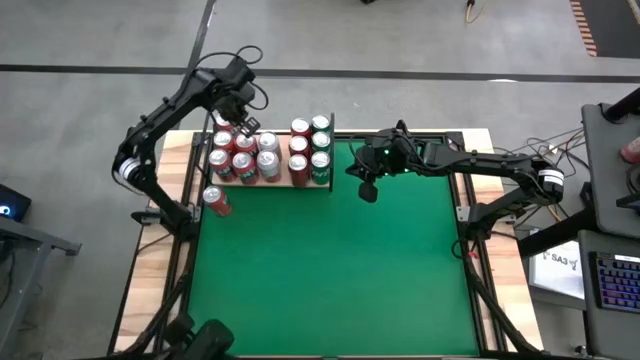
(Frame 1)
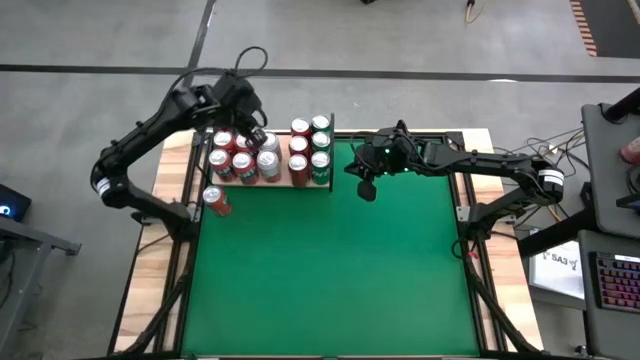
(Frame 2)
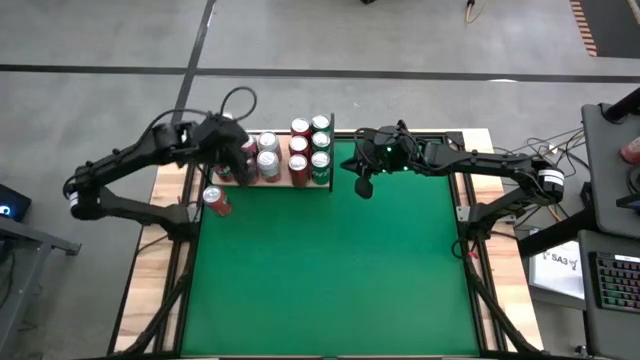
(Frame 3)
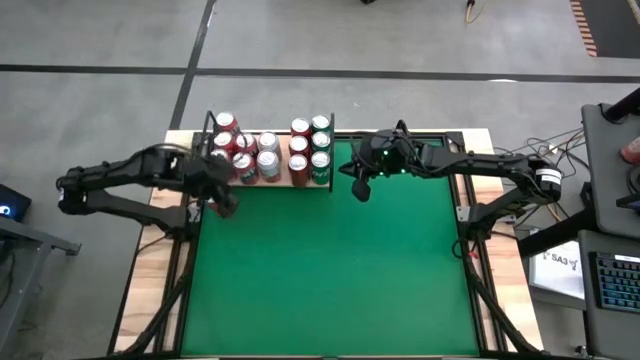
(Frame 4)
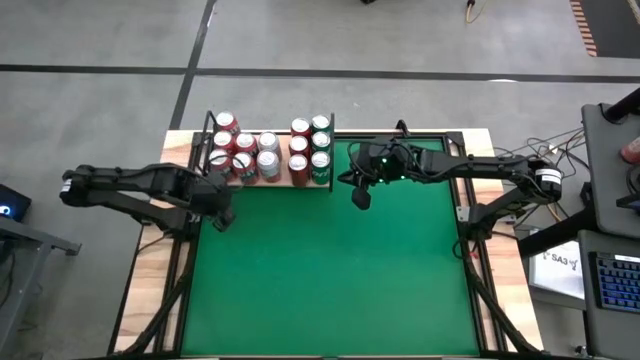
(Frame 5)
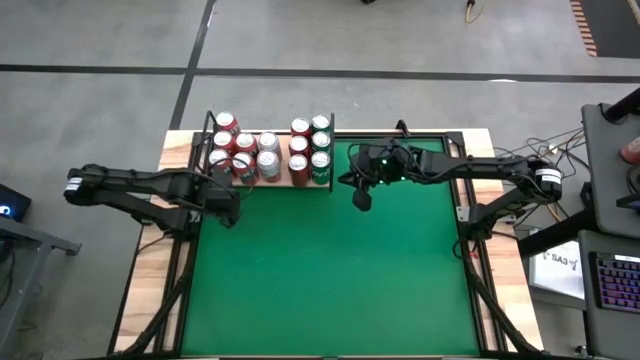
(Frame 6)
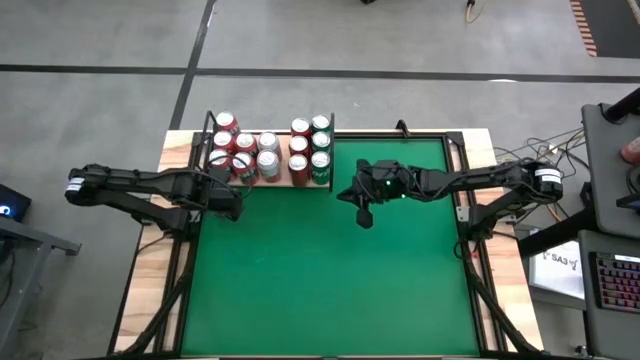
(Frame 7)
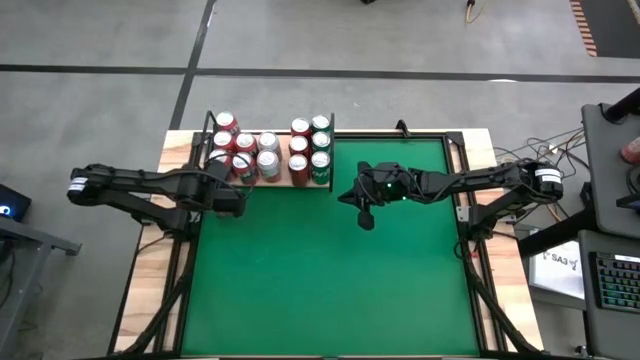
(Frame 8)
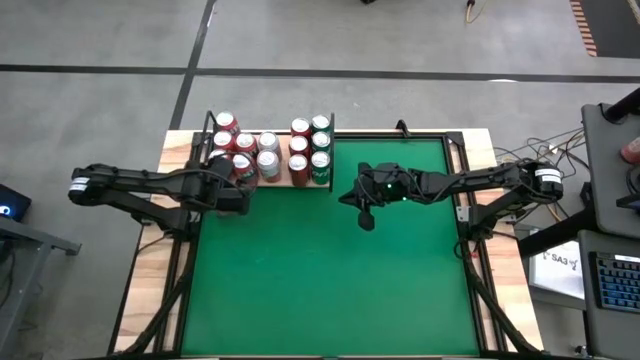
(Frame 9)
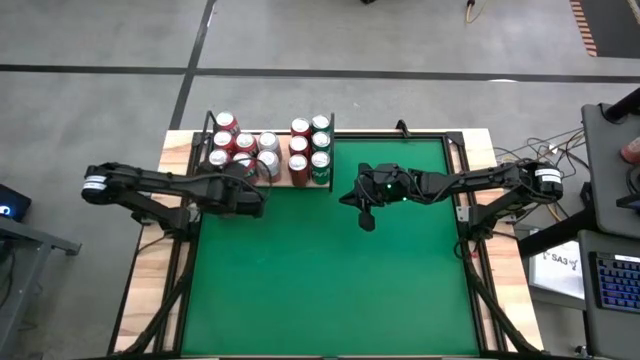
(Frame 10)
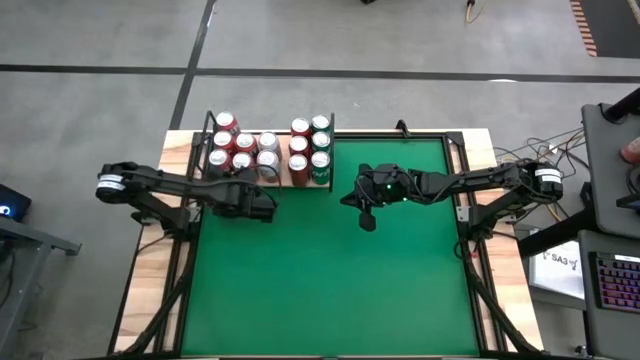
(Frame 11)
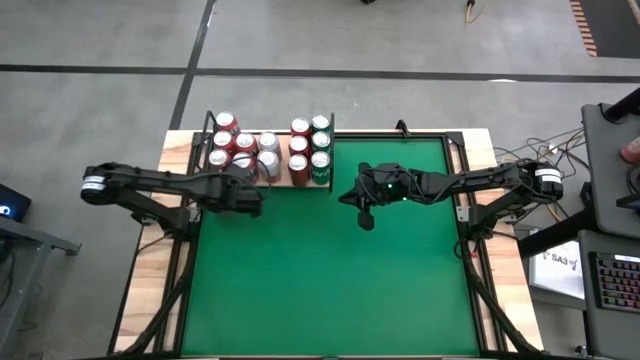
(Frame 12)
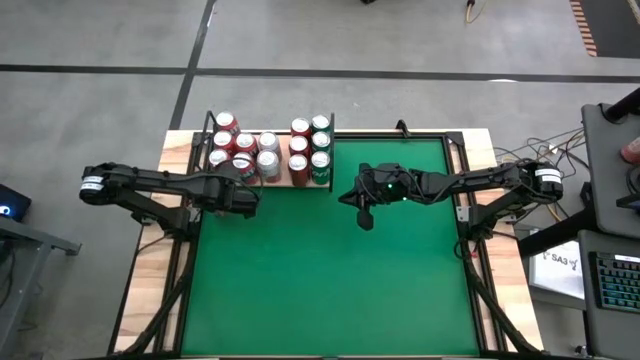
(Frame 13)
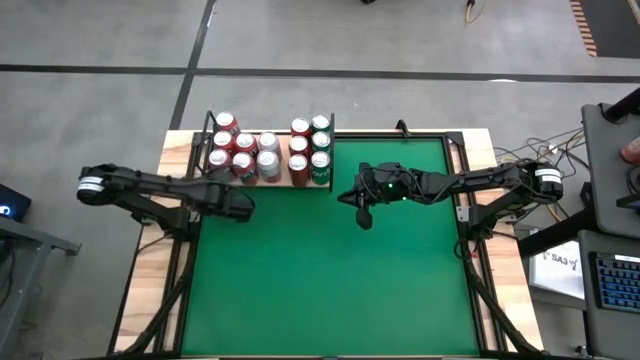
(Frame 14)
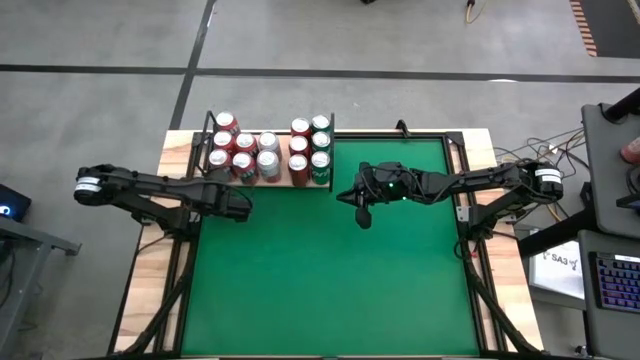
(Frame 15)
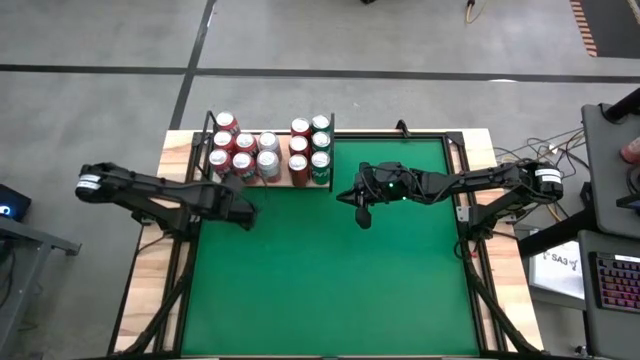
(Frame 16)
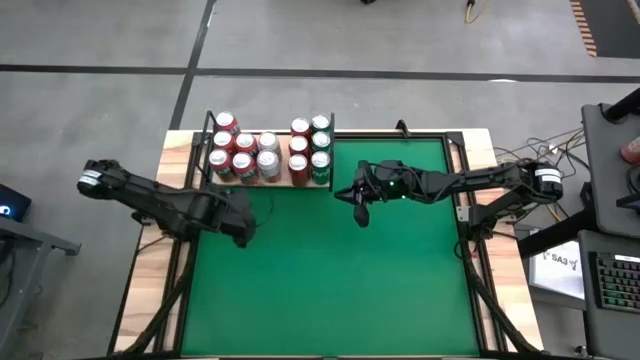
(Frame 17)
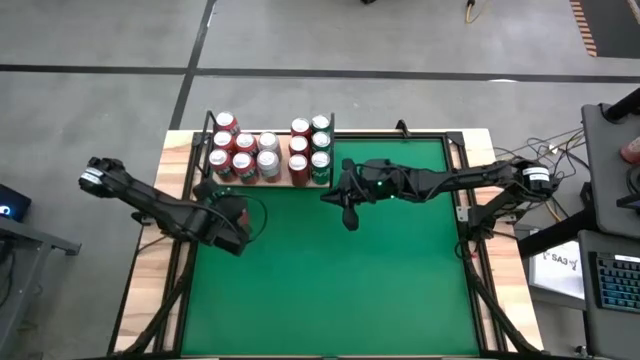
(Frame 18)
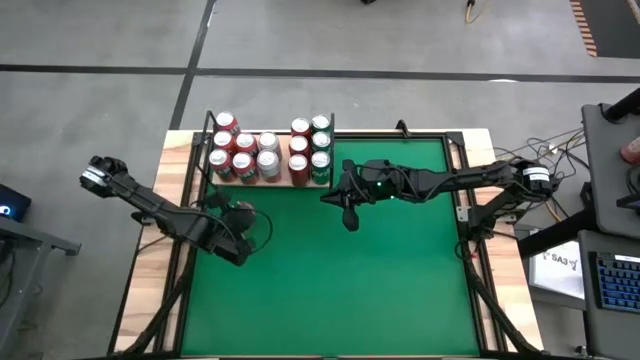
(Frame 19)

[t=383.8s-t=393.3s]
Task: Place canned beverage on shelf
Put the red soda can on the shelf aligned with the other red soda can

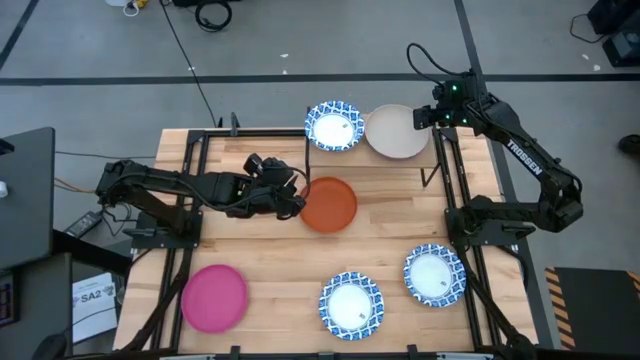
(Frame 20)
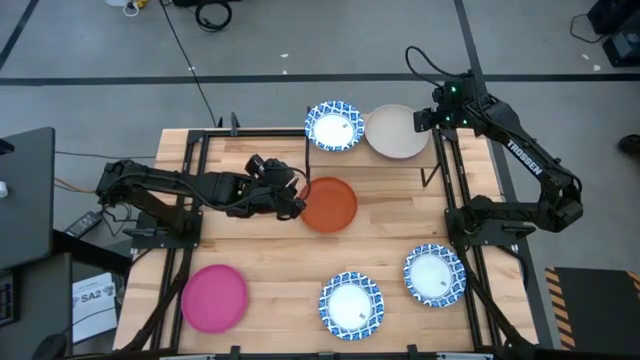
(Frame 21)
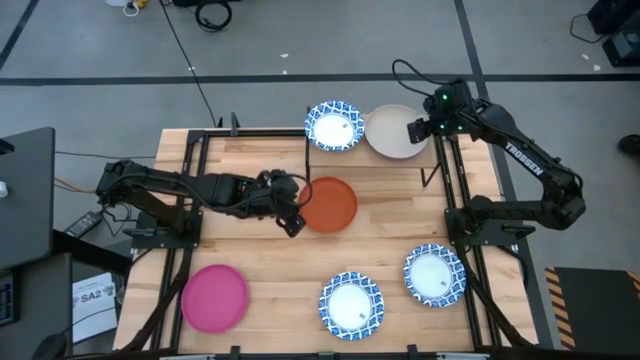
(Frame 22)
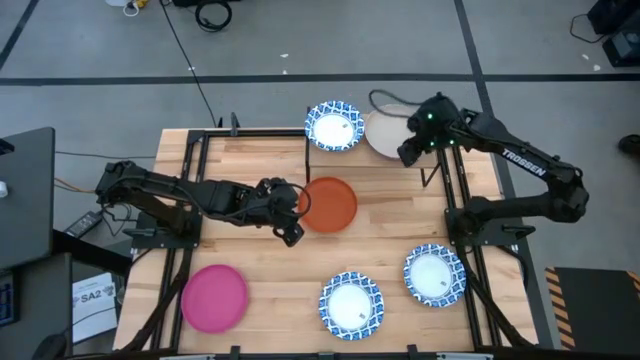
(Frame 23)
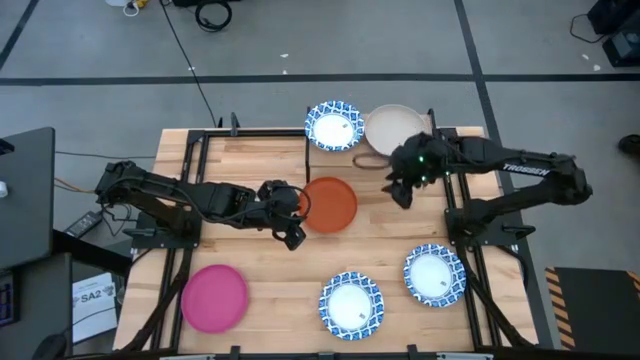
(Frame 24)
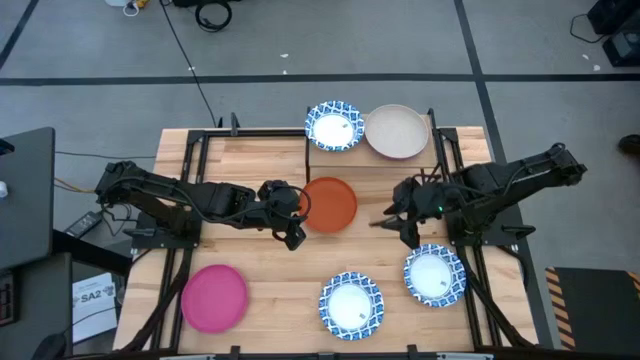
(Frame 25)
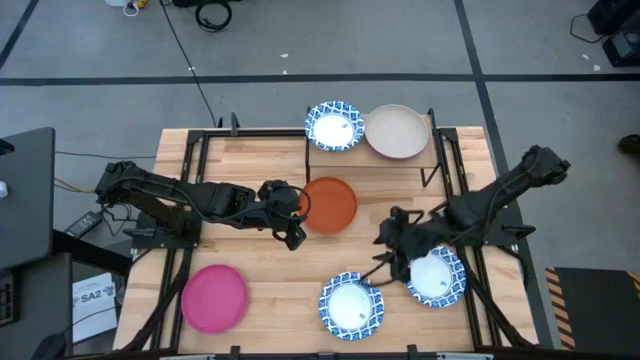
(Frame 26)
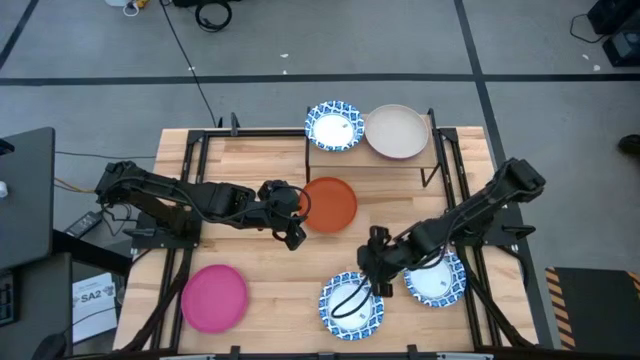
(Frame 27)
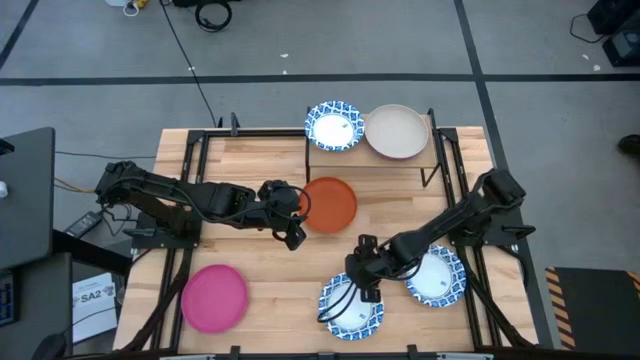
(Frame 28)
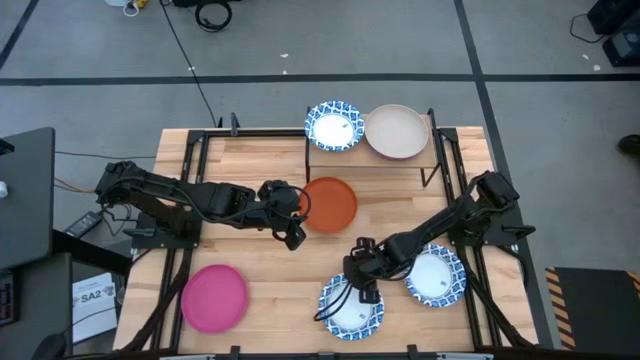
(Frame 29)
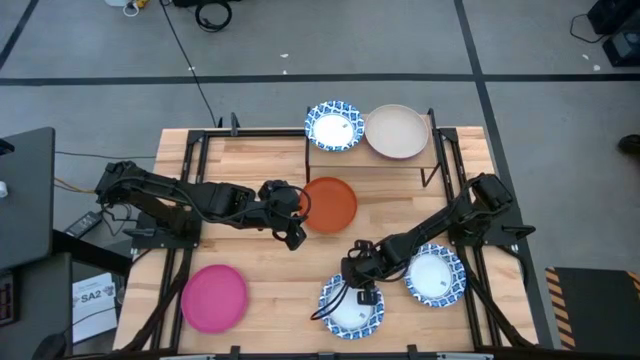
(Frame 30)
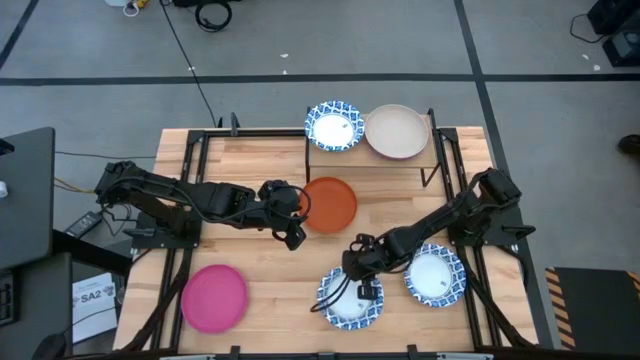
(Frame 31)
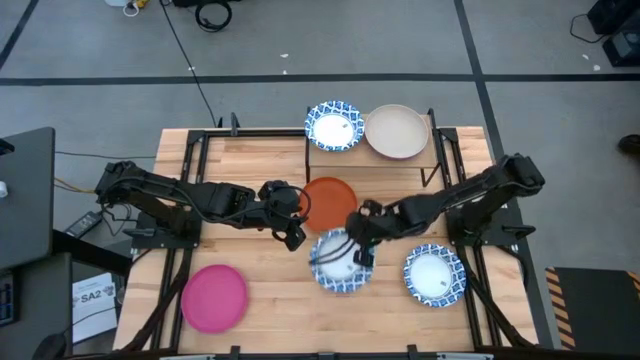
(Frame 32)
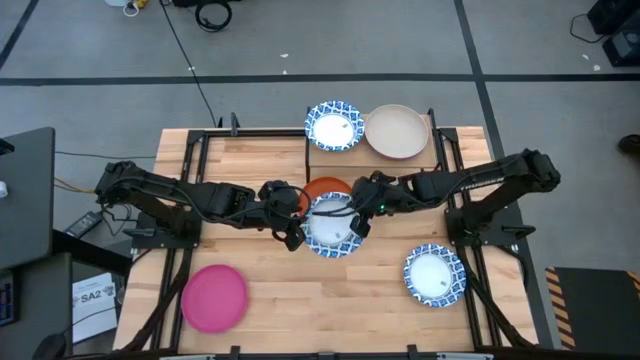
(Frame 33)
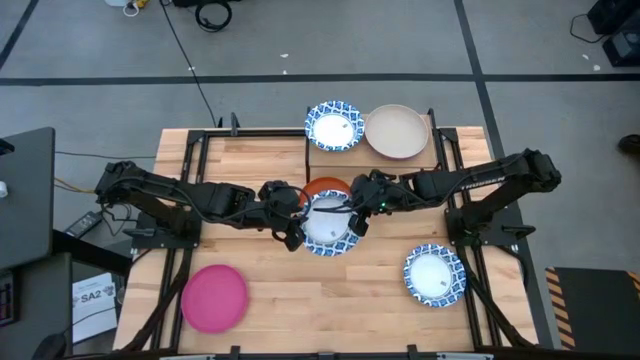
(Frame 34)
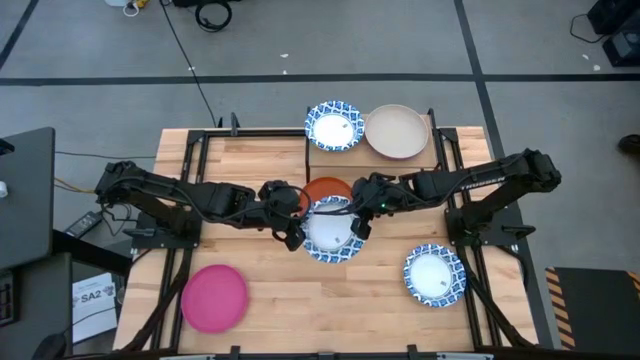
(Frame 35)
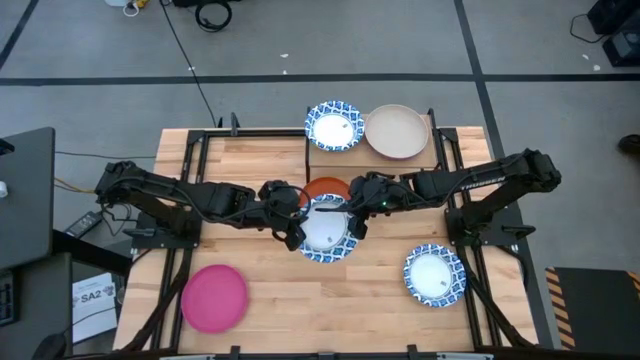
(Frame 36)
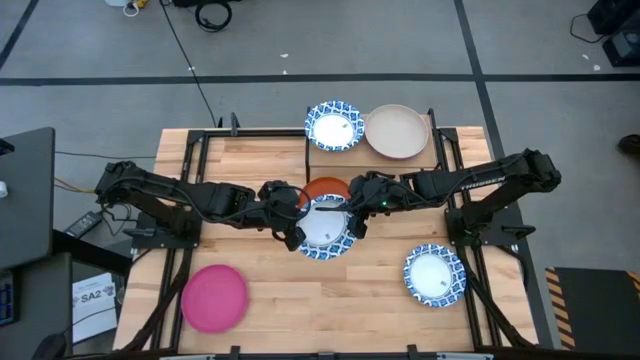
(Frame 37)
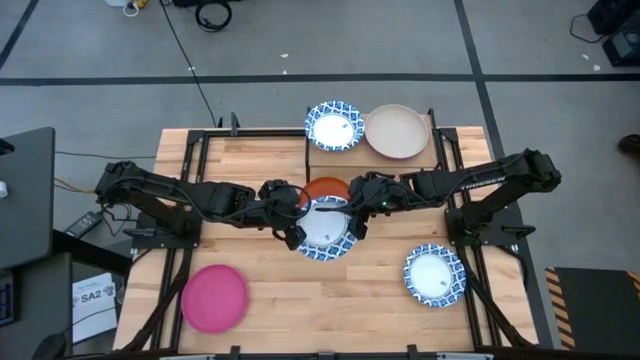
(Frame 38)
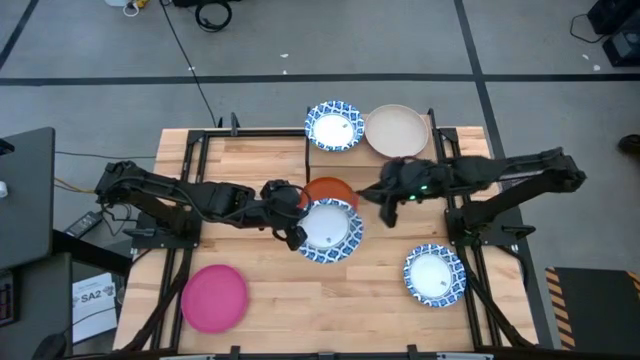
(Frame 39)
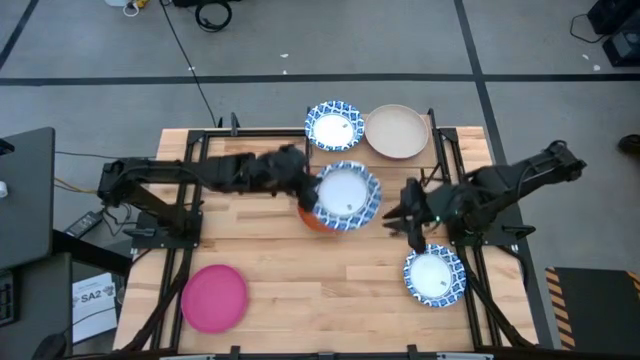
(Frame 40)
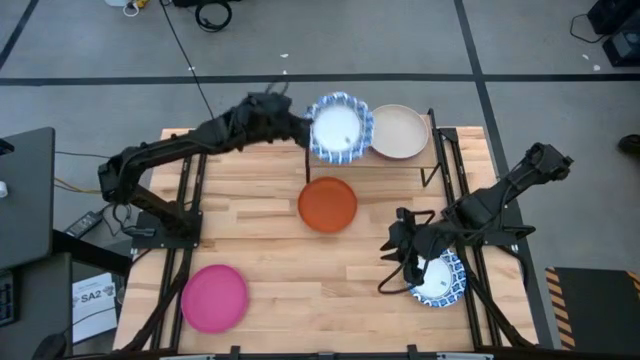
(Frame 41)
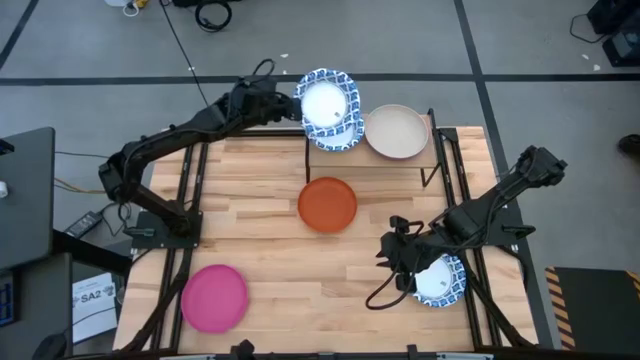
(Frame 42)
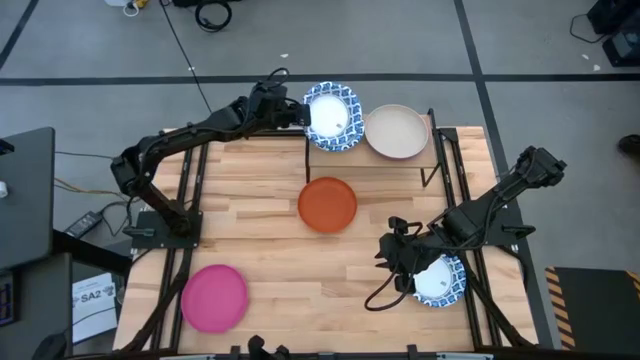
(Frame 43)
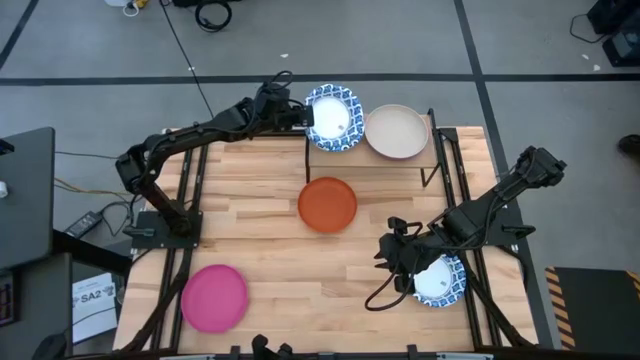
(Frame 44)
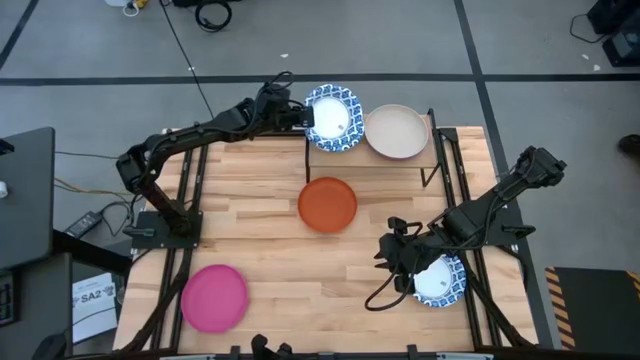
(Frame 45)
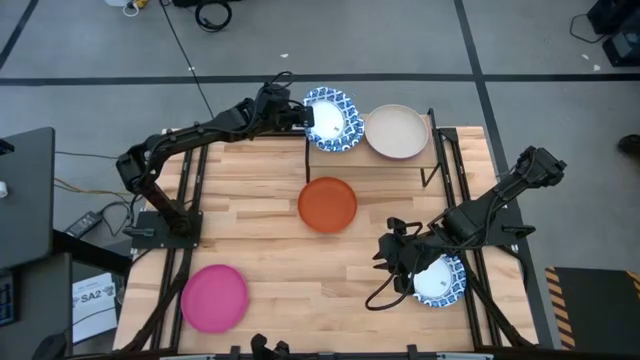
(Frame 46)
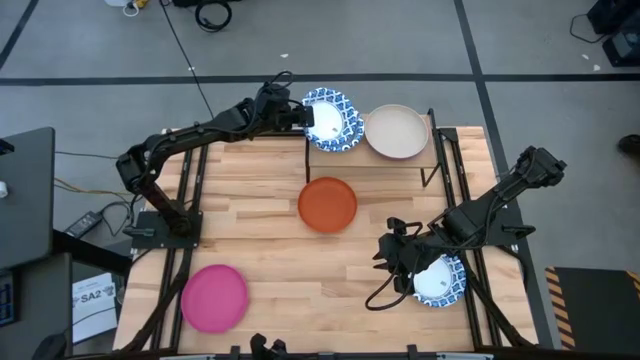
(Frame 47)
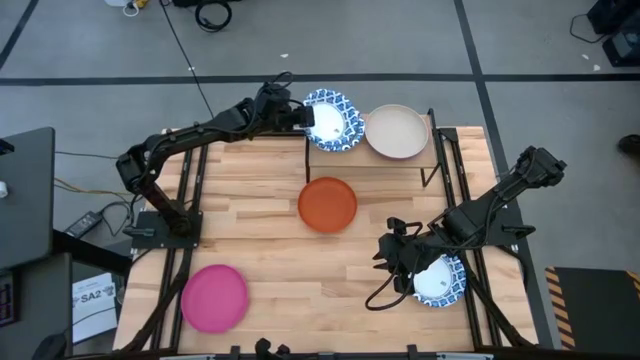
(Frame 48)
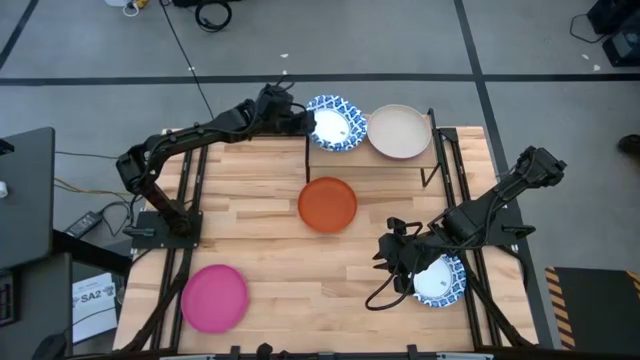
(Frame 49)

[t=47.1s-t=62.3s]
Task: Place and stack plates onto a shelf
Stack the white plate on top of the white plate on the shelf
